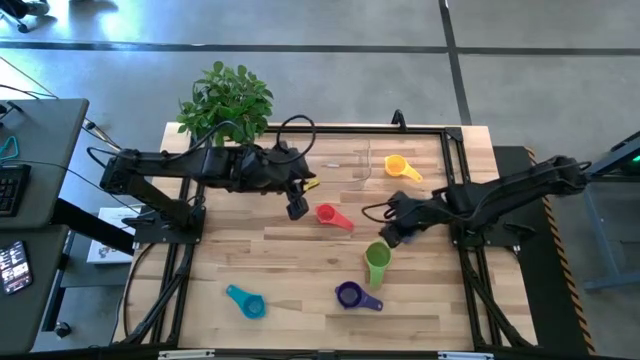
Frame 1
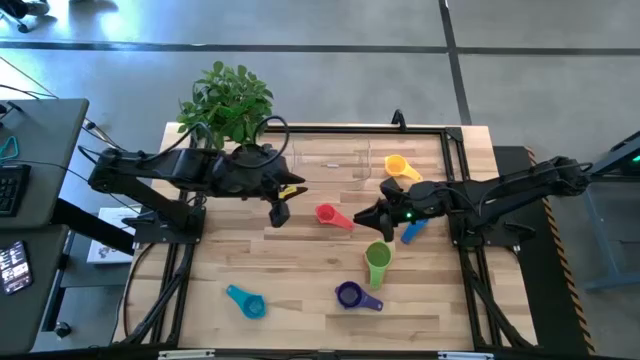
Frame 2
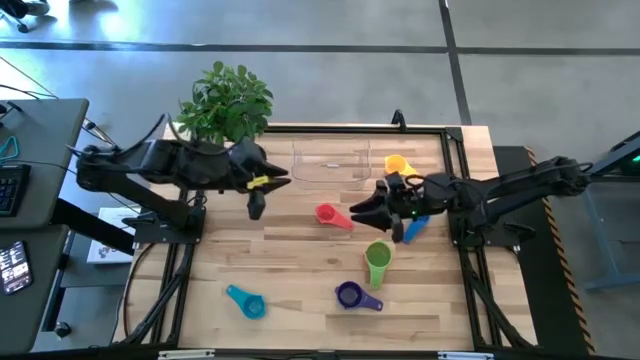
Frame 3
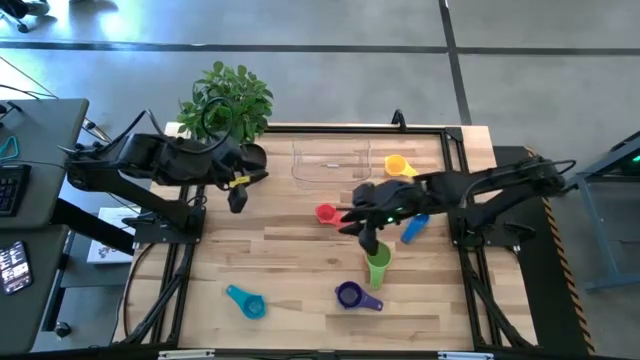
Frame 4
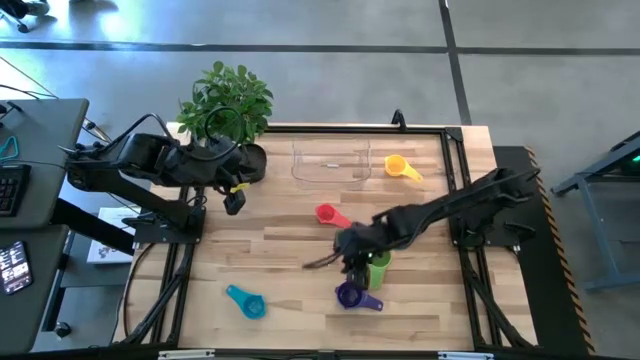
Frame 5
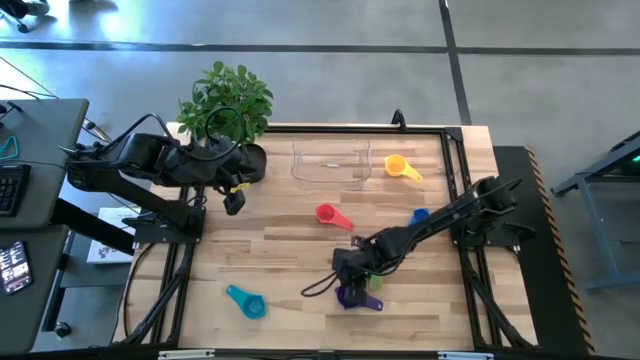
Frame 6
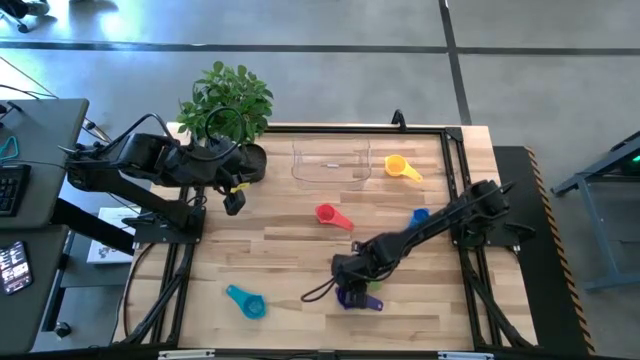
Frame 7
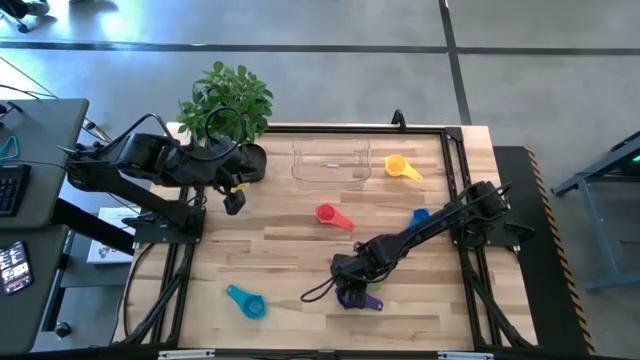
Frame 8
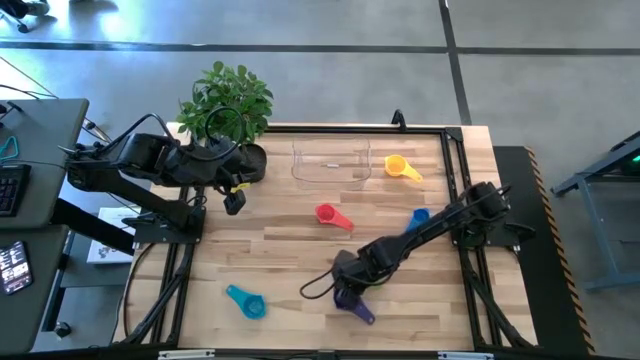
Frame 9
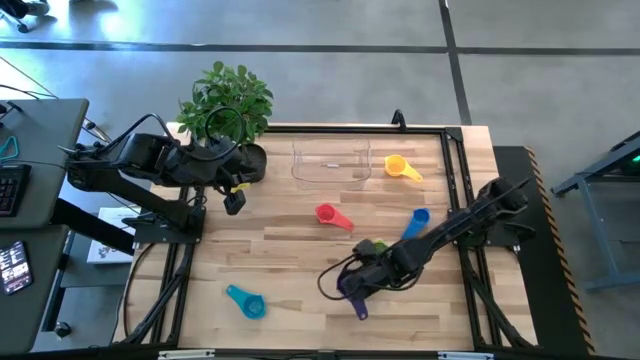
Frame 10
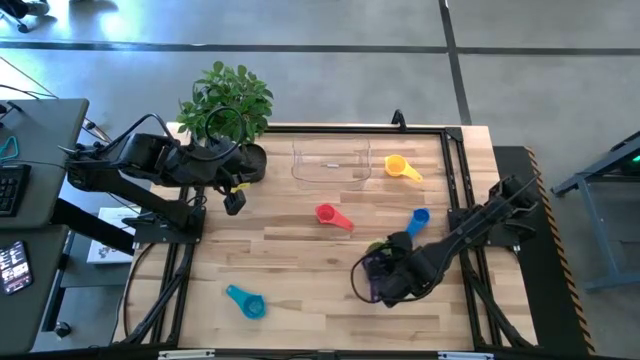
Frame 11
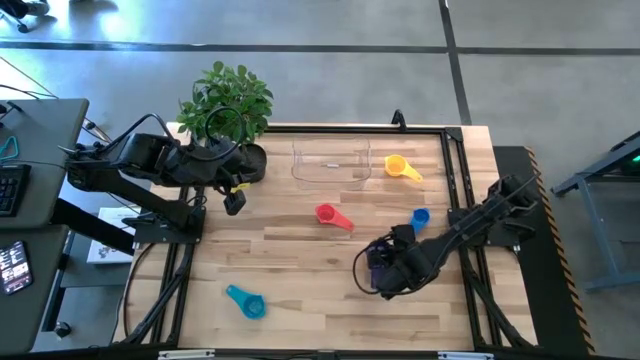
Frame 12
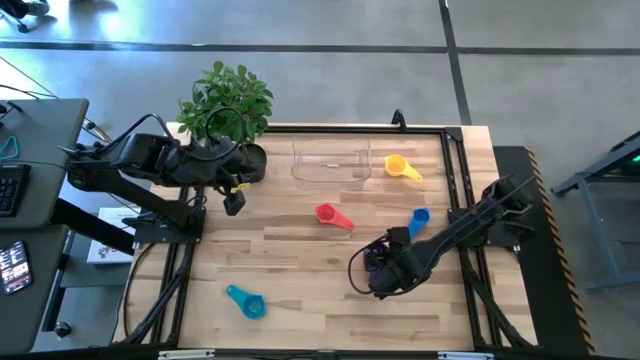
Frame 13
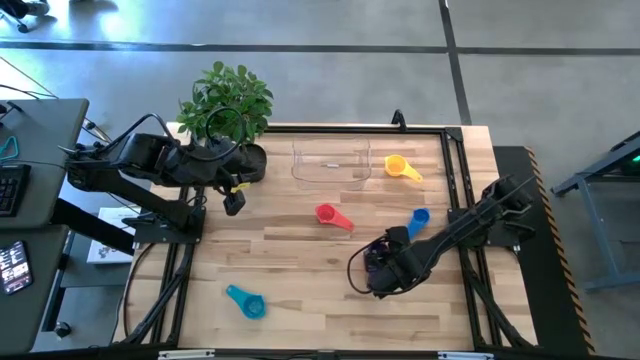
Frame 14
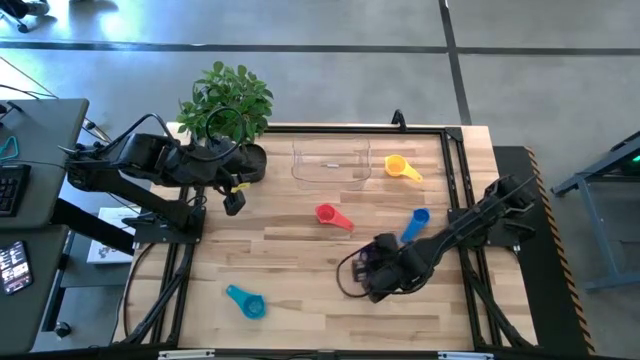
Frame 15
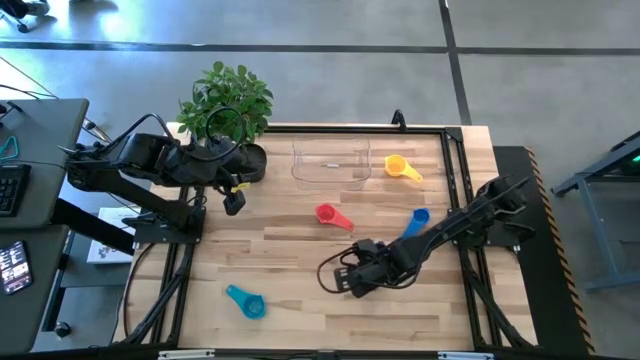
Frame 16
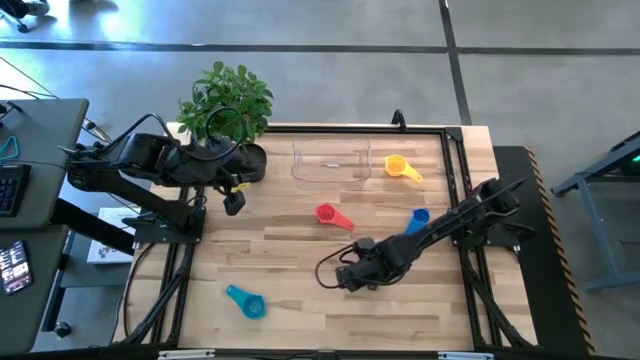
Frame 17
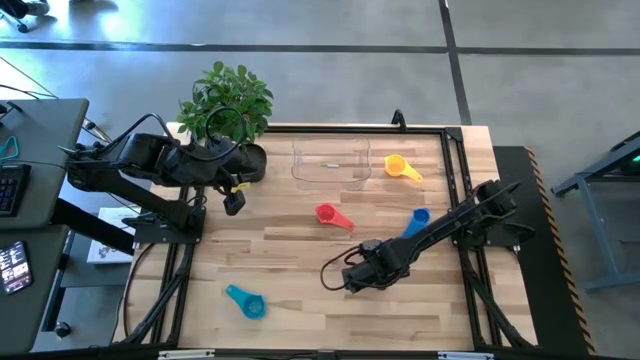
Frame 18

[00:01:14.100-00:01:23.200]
Task: Nest measuring cups in basket
Stack the purple measuring cup on top of the green measuring cup

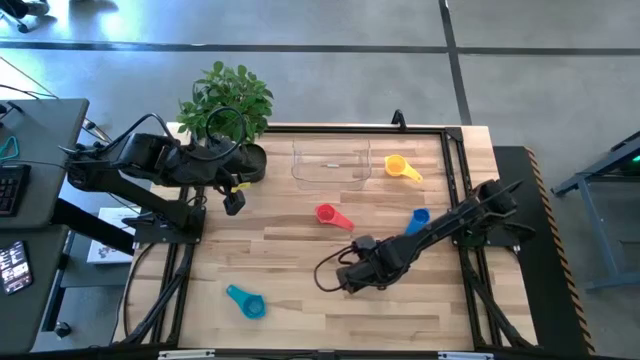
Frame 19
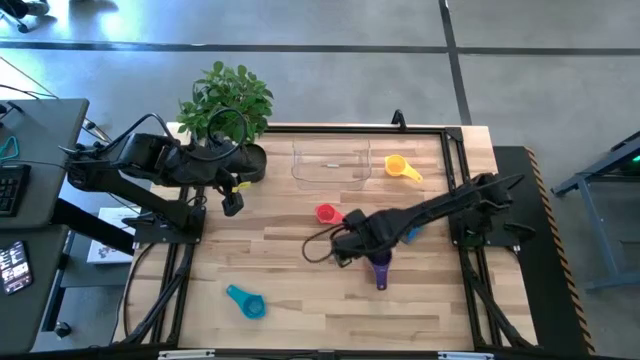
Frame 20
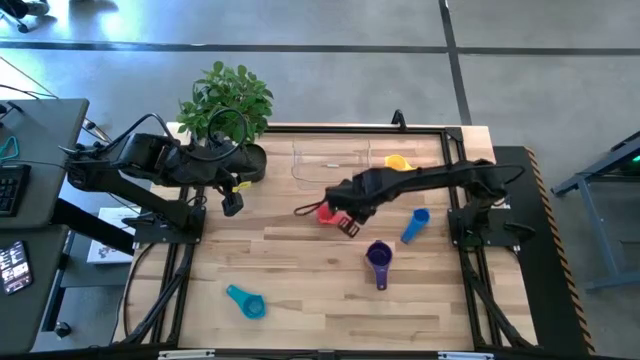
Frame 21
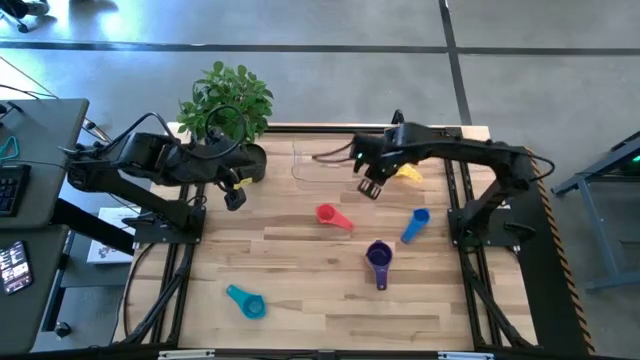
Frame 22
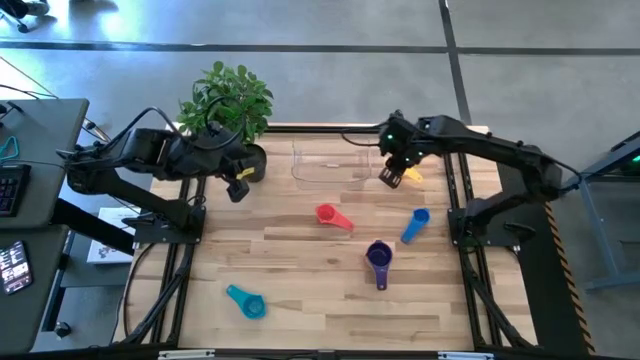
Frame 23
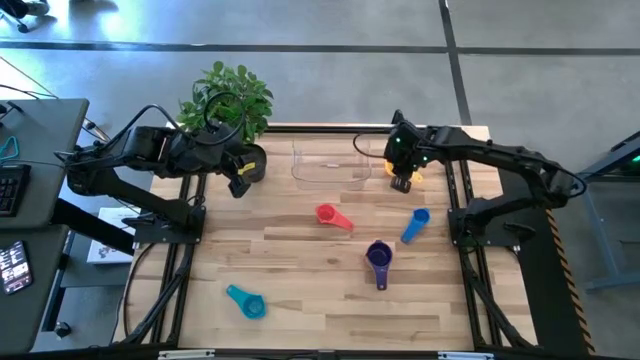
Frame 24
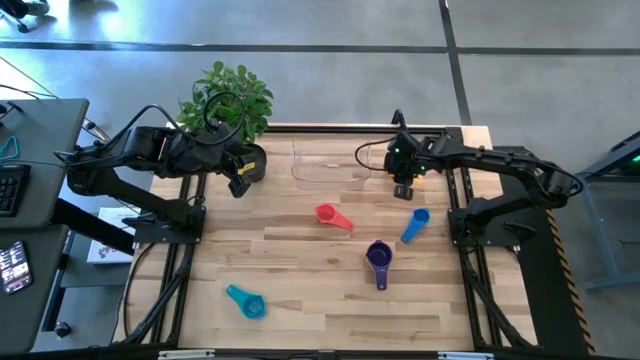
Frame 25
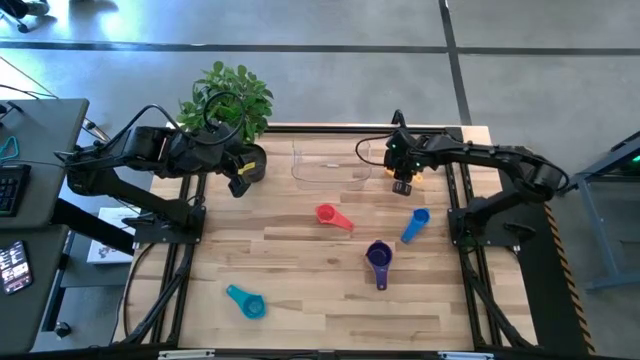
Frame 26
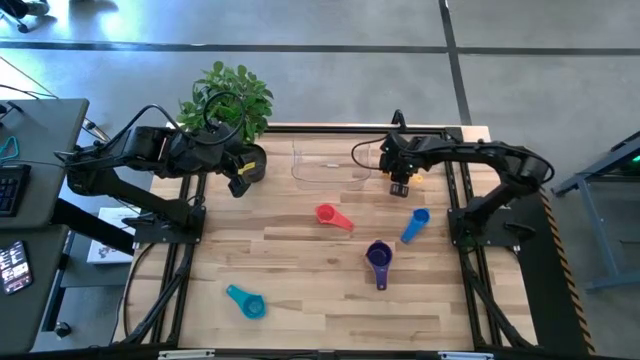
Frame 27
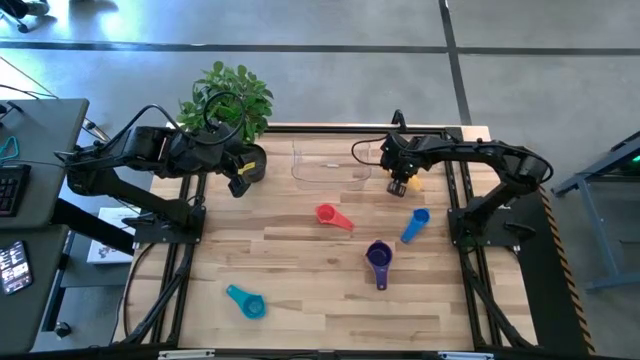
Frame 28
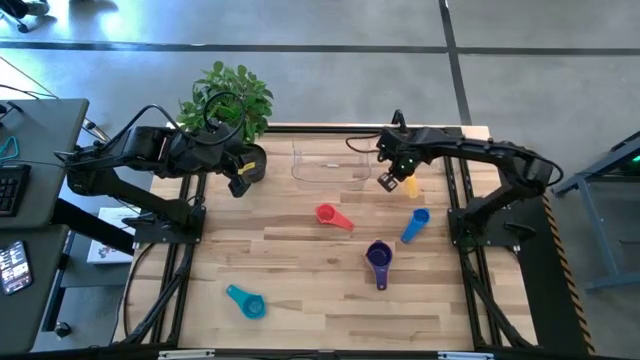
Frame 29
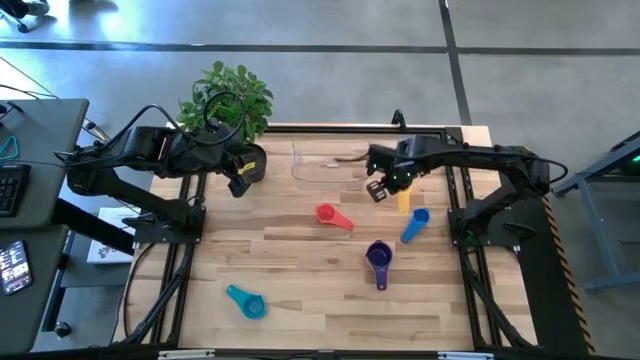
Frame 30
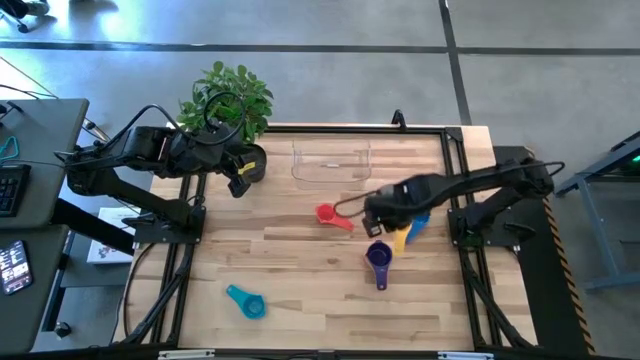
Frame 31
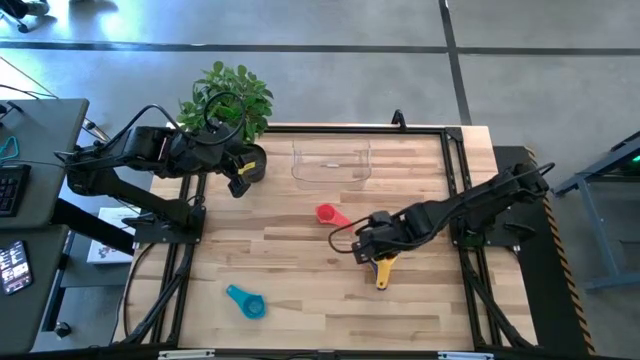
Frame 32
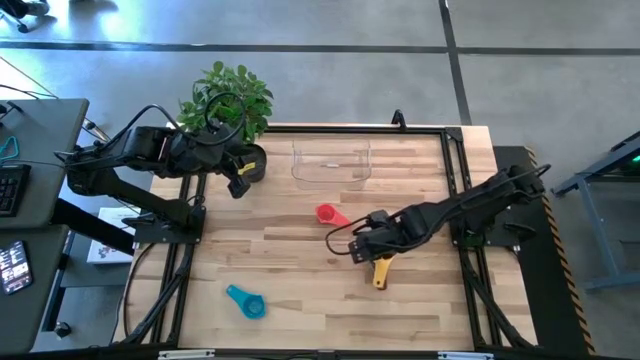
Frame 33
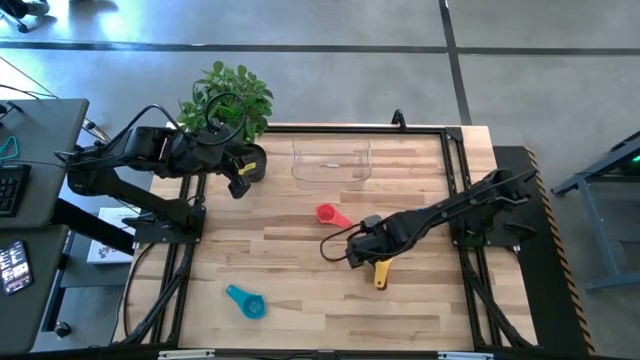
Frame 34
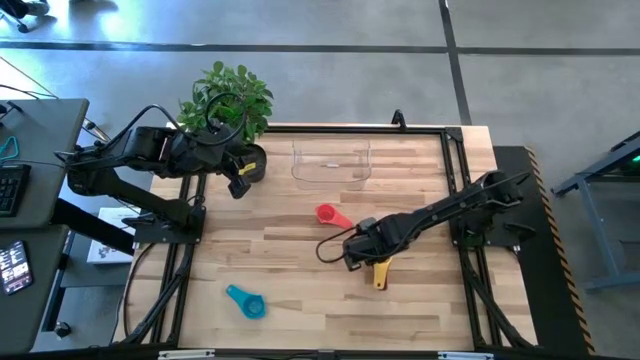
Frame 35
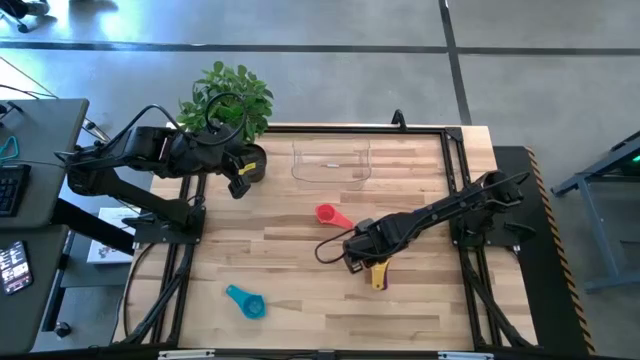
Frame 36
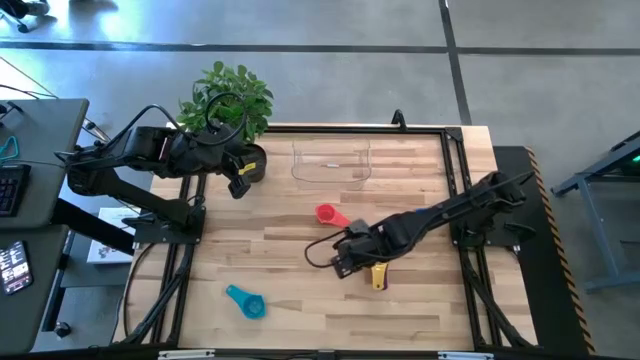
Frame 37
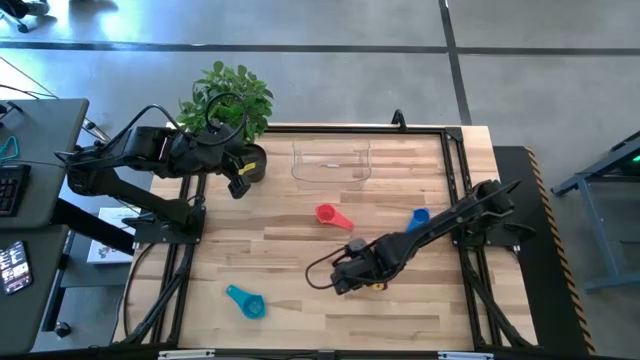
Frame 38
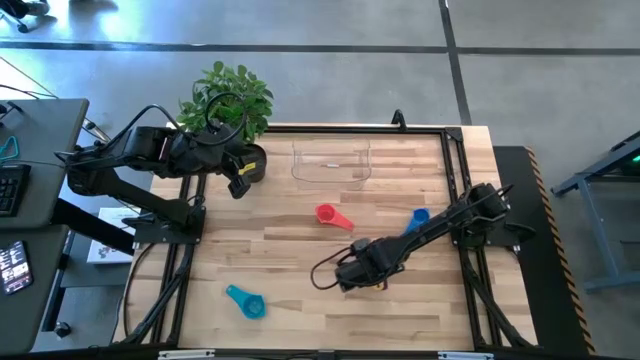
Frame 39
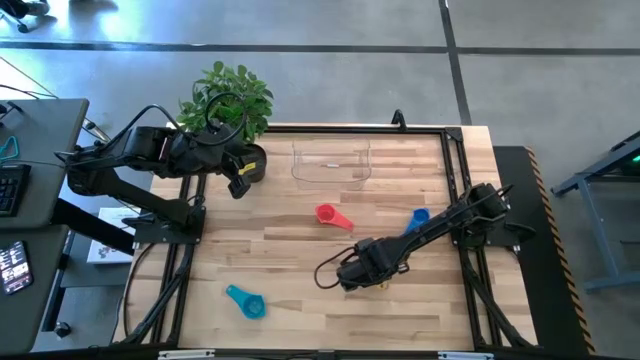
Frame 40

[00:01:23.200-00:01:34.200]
Stack the yellow measuring cup on top of the purple measuring cup

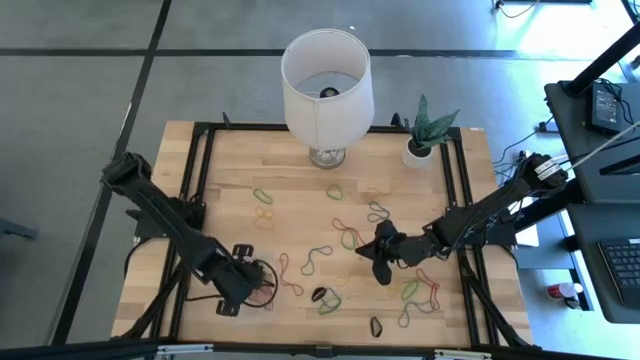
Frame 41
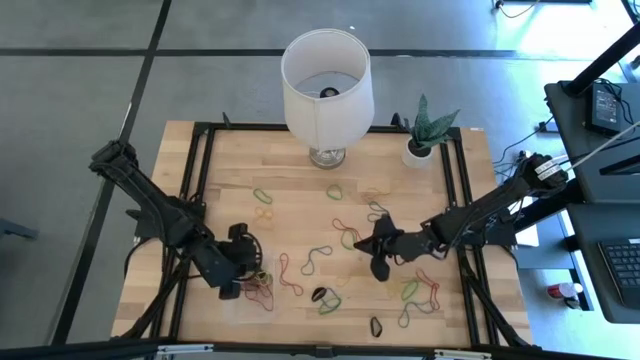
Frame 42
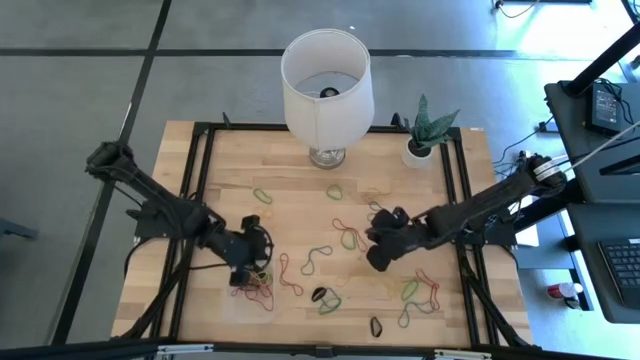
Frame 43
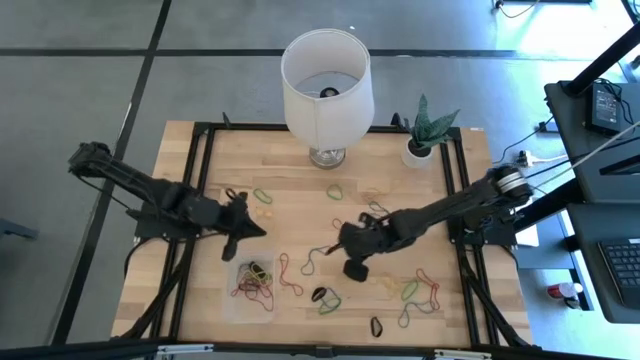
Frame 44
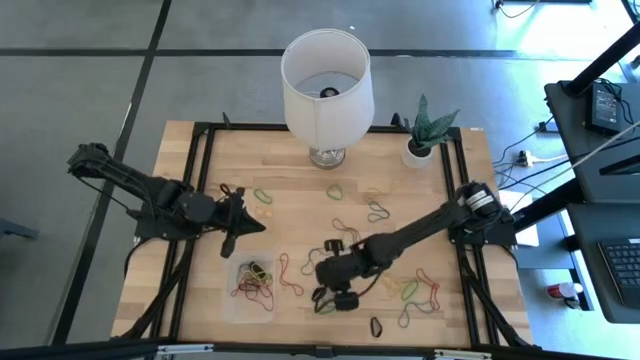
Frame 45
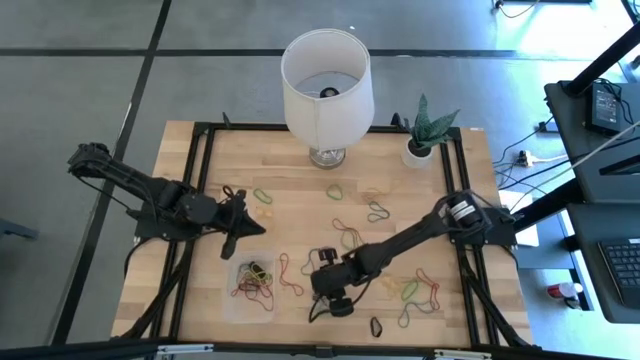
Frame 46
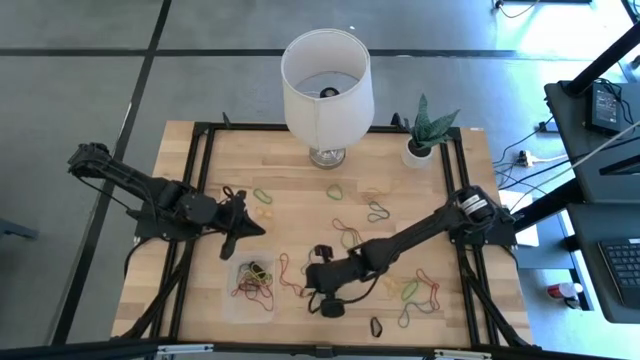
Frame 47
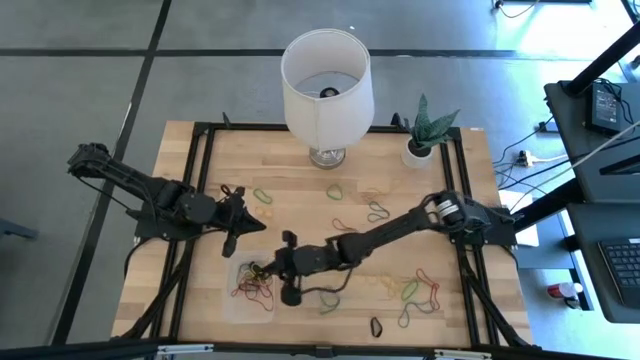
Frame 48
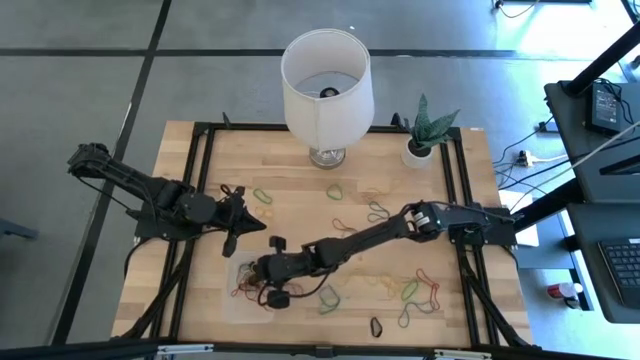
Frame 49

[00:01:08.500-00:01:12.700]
Task: Pick and place rubber bands into bin
Put the black rubber band into the transparent bin
